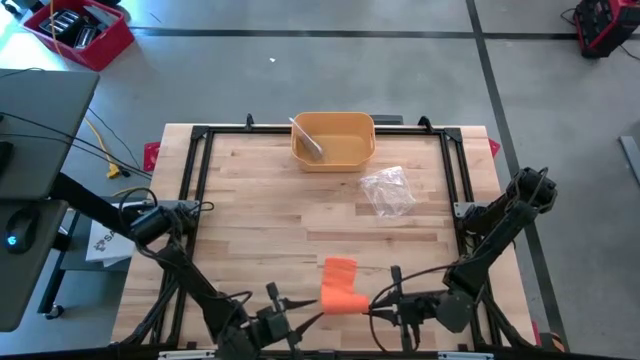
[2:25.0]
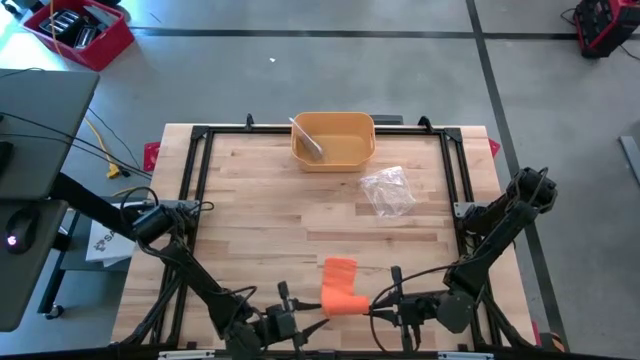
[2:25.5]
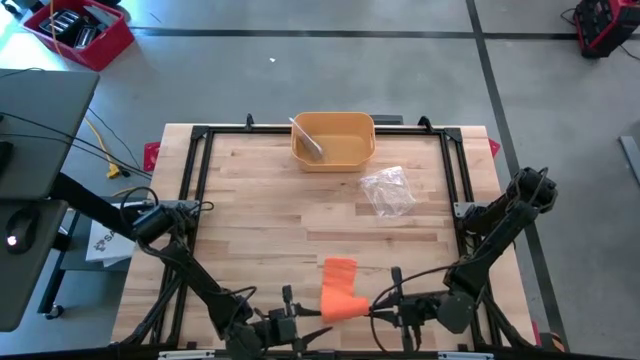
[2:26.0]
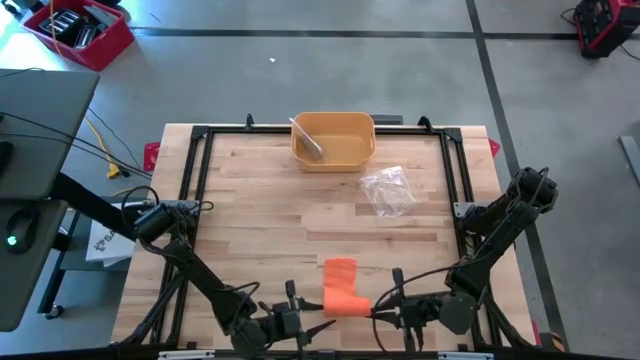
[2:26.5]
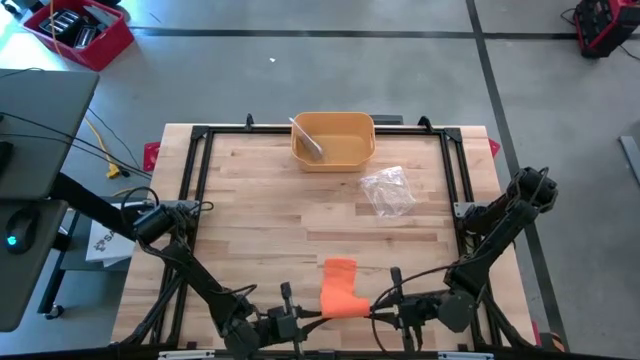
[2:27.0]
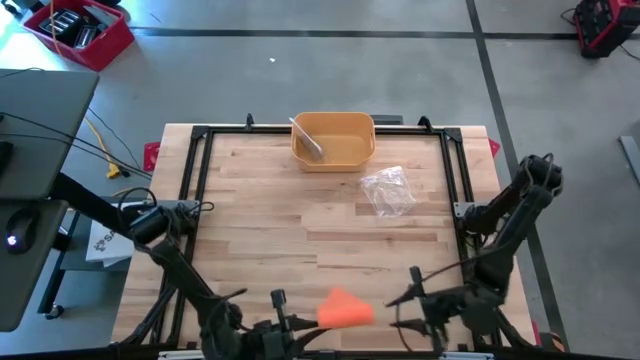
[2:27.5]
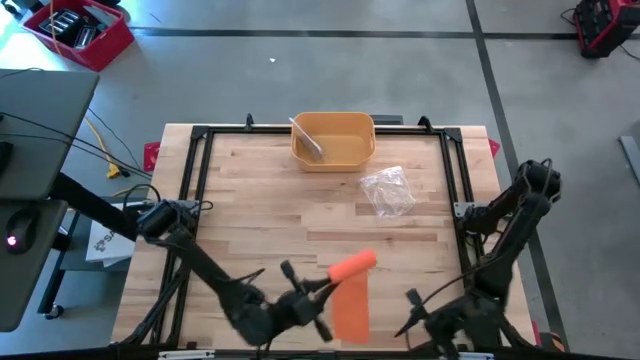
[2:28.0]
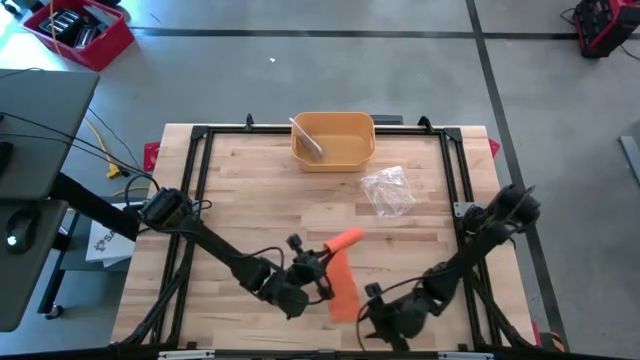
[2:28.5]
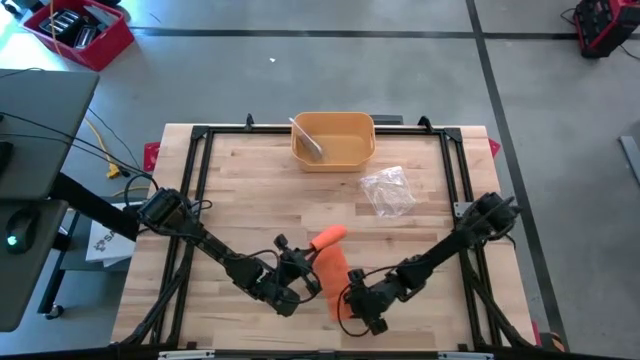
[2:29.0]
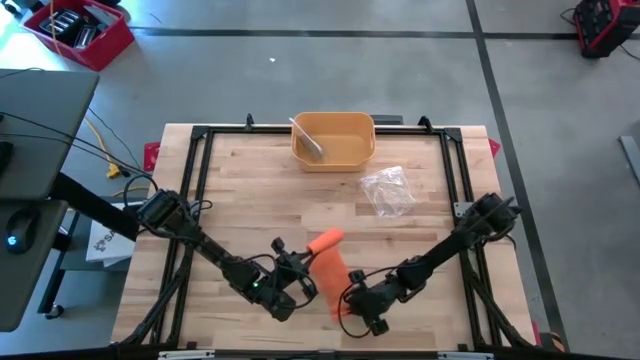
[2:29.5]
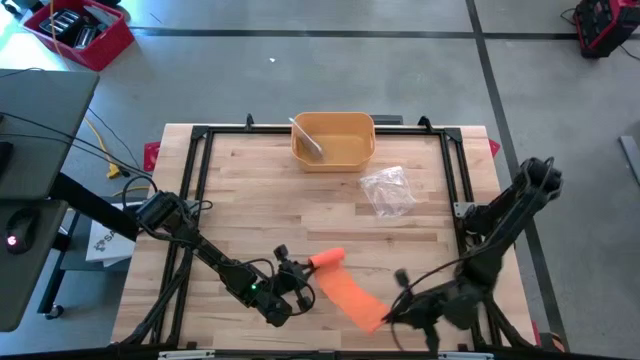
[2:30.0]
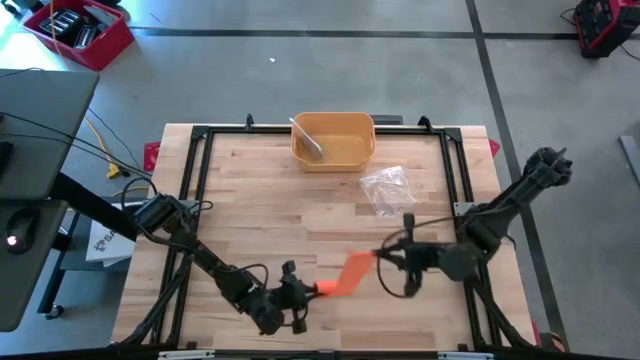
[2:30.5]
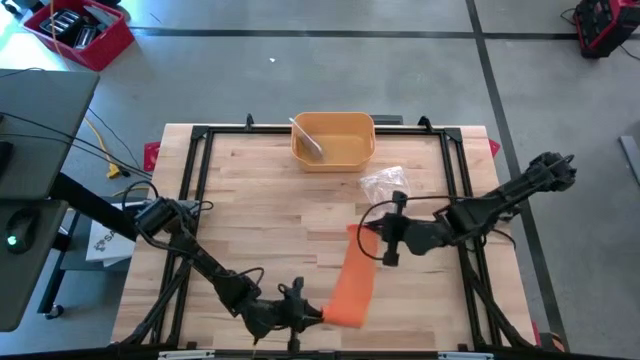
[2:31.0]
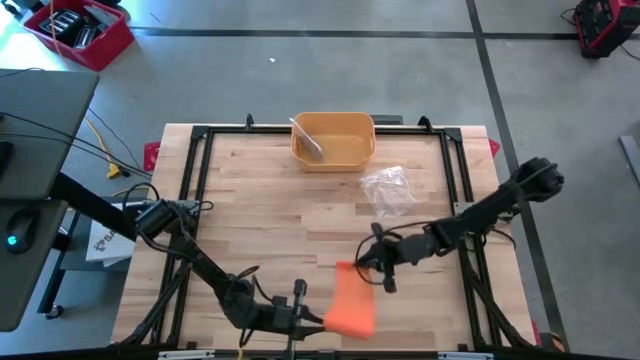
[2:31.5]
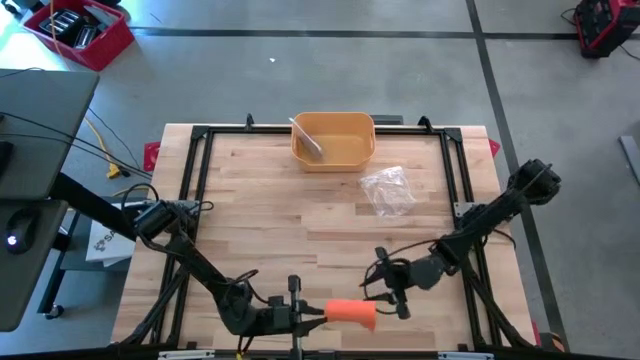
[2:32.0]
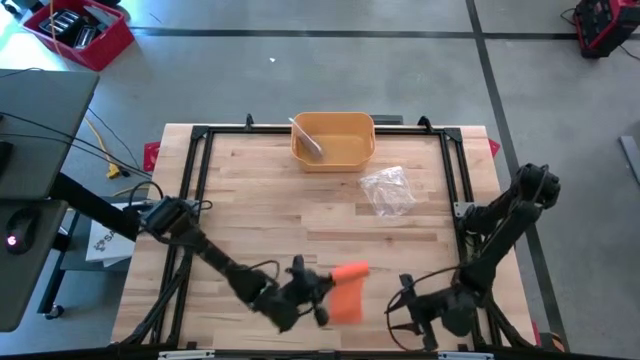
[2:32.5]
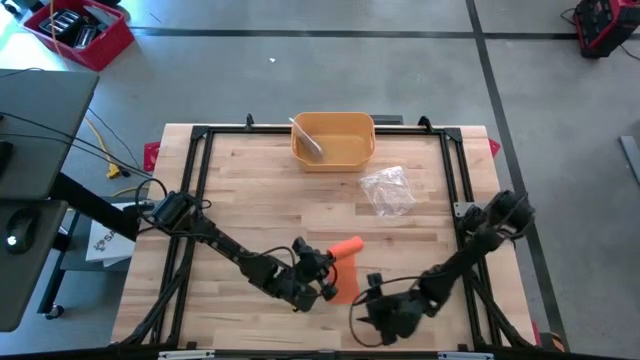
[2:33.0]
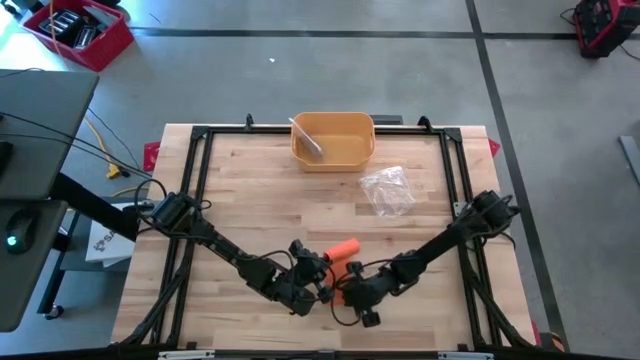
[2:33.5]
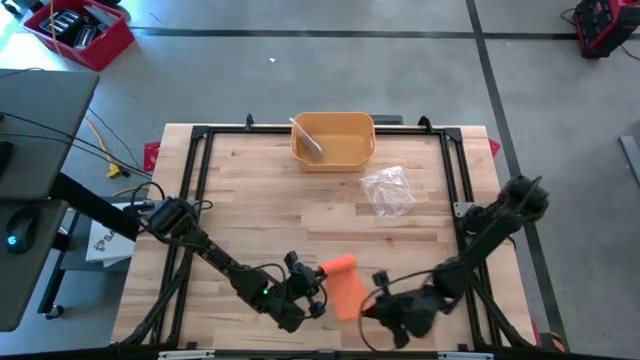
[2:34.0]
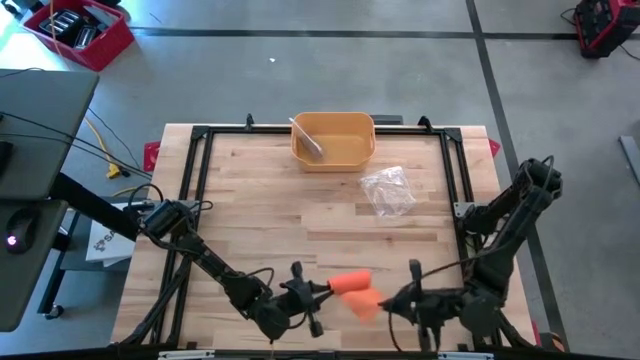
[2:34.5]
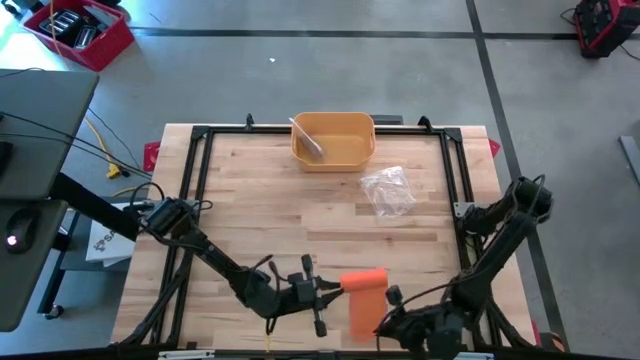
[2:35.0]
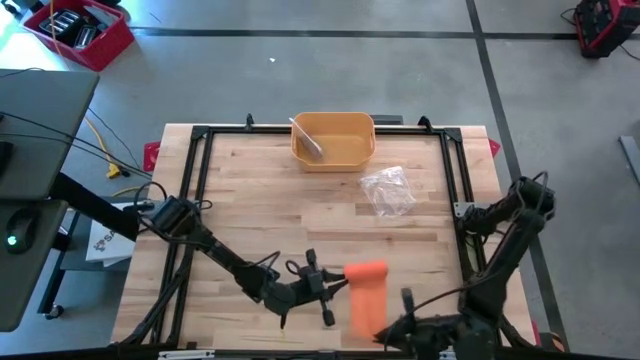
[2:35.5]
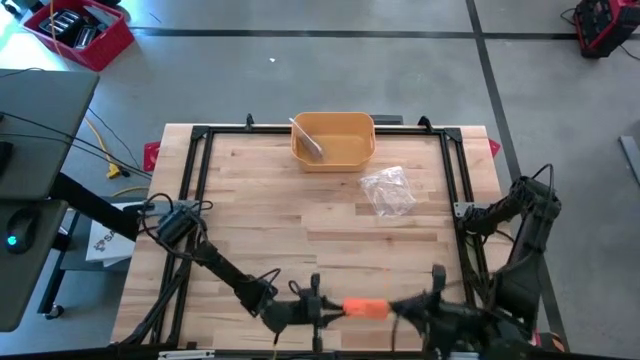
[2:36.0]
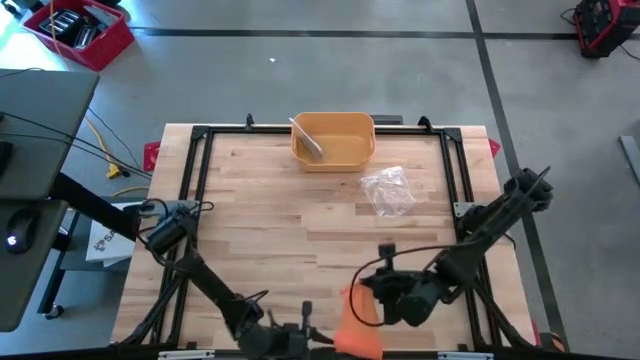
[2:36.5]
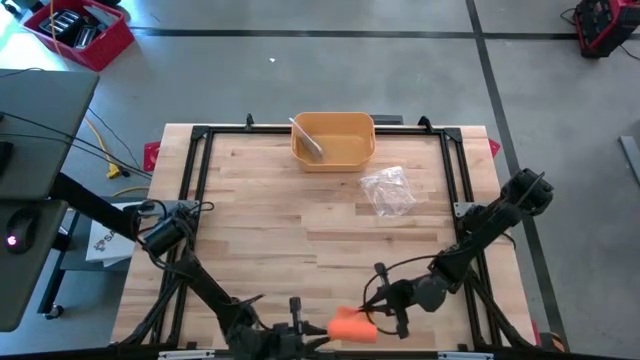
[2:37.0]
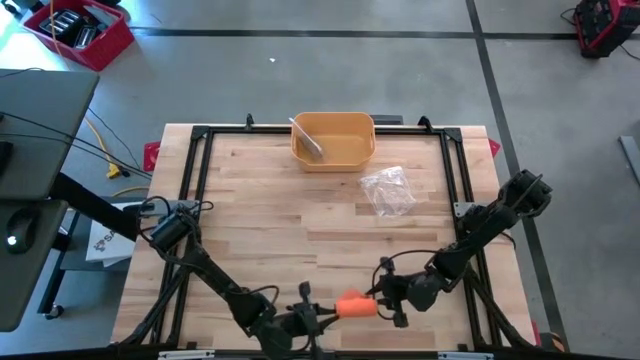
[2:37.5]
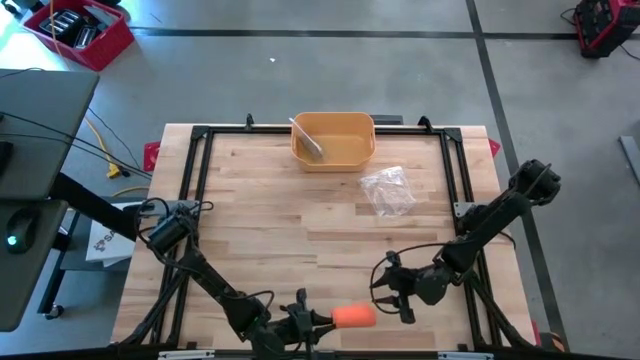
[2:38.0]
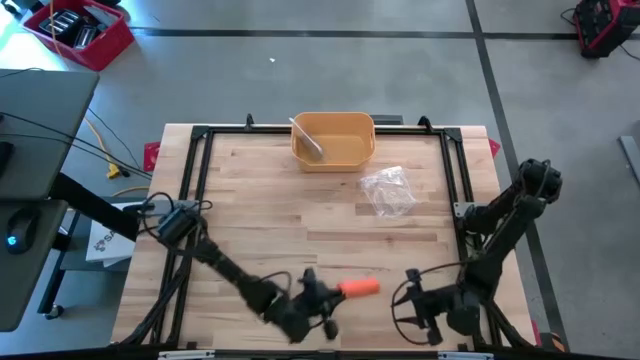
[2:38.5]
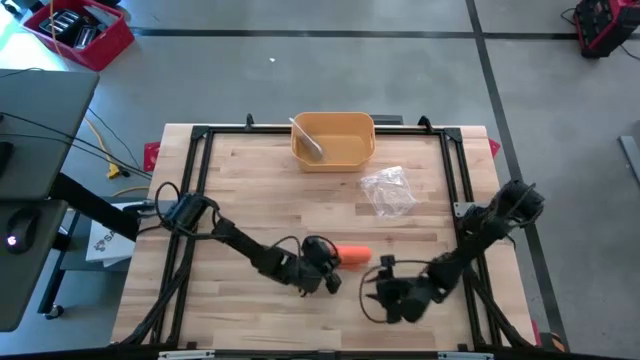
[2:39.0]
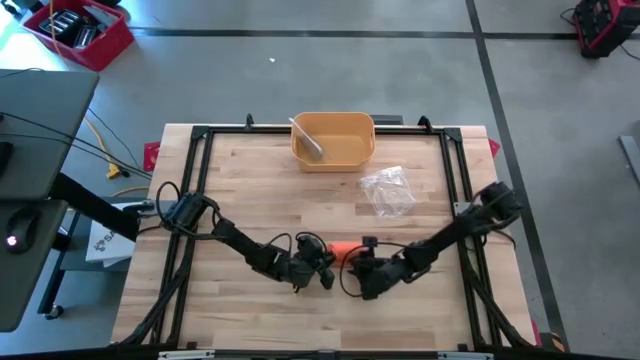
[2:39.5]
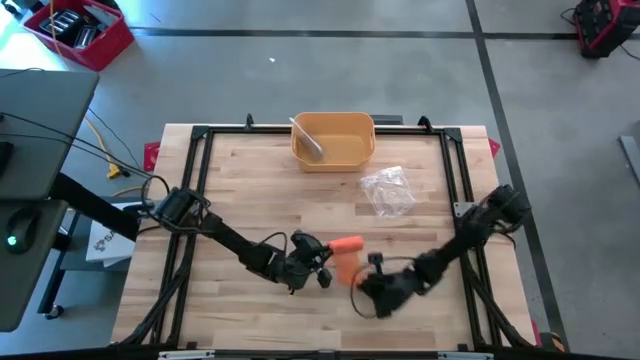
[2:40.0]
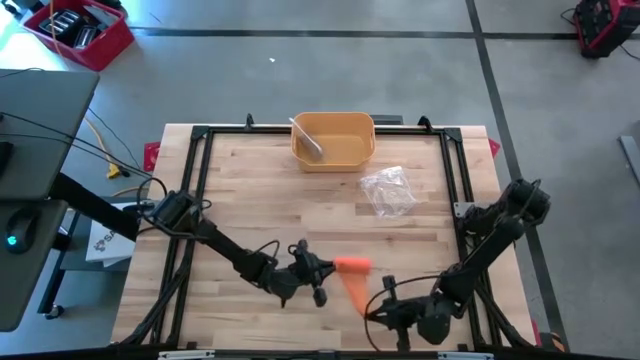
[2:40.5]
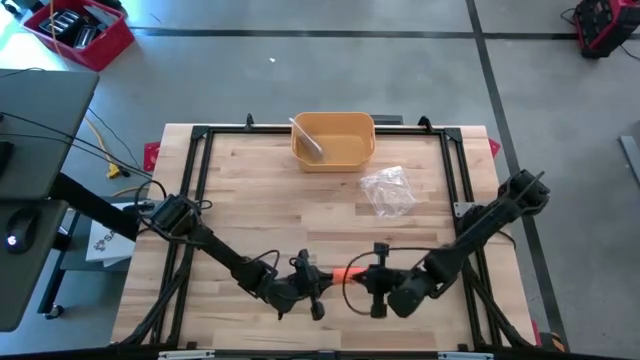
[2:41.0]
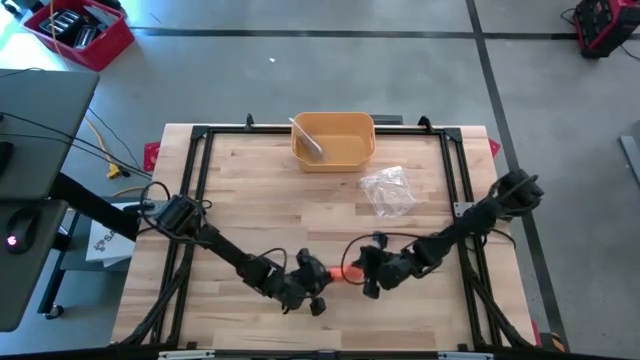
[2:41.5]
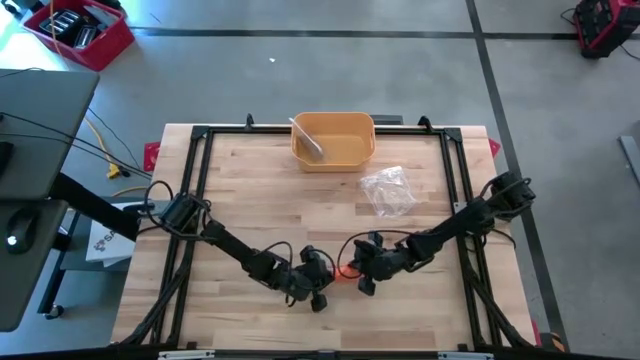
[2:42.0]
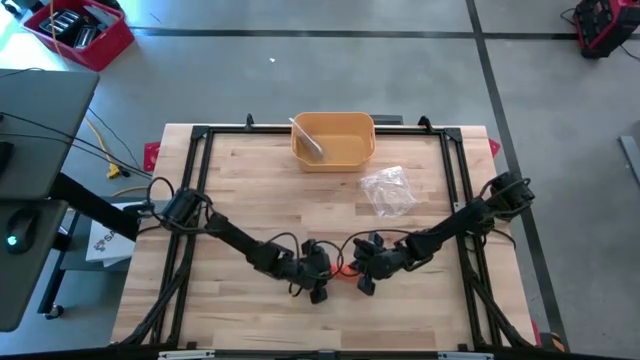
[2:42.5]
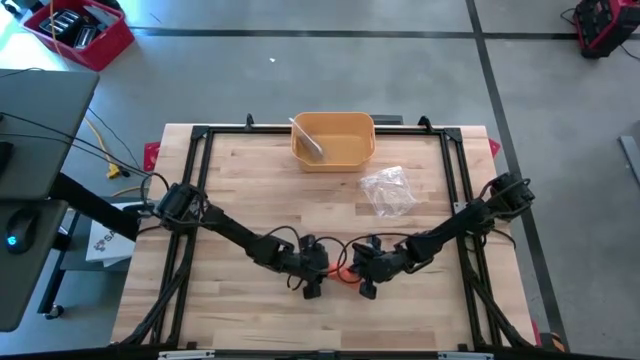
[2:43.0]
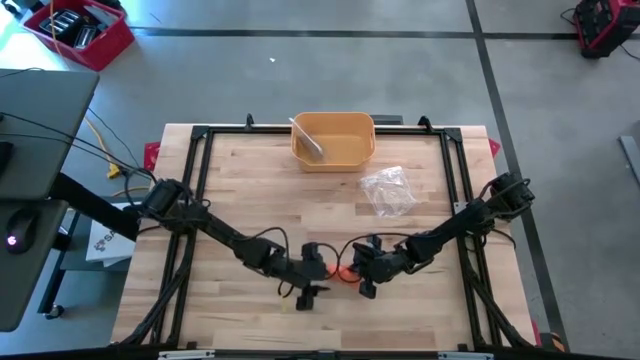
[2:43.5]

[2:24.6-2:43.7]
Task: Roll bandage
Roll the orange bandage
